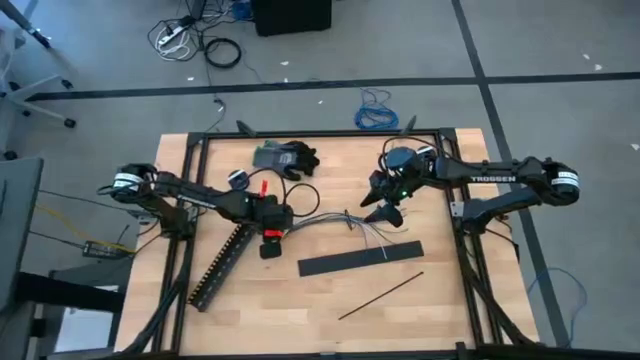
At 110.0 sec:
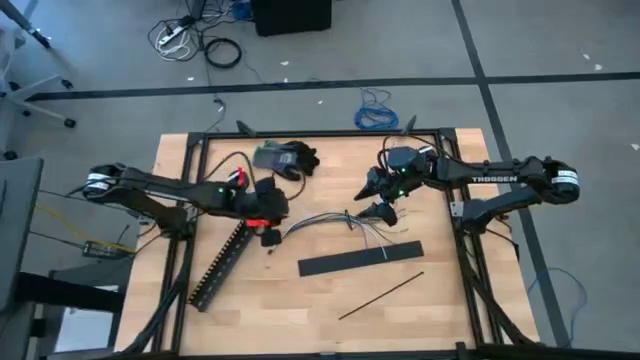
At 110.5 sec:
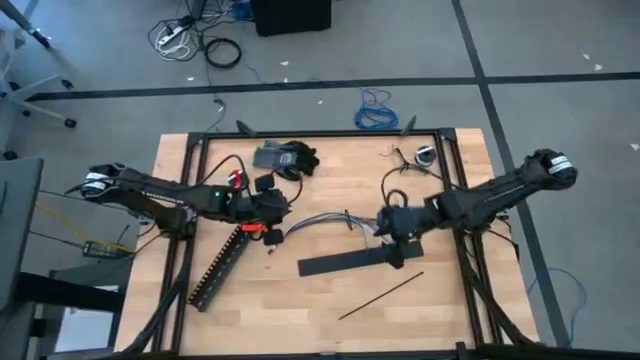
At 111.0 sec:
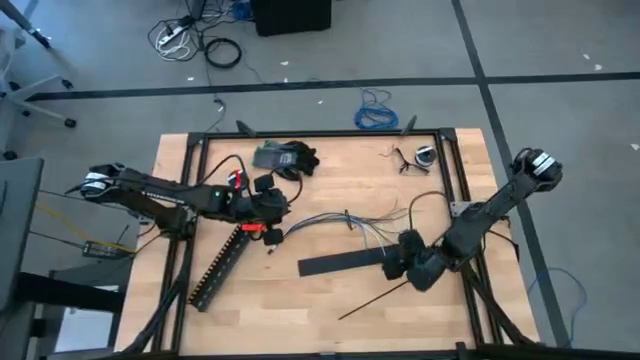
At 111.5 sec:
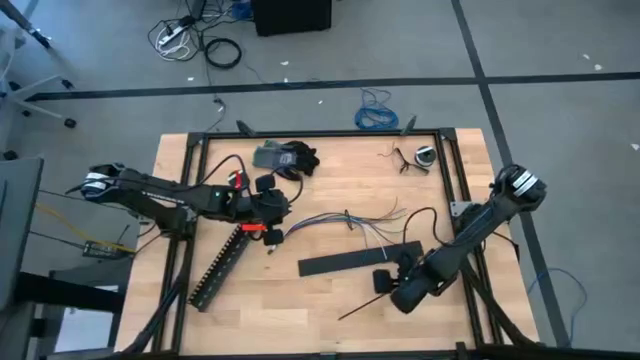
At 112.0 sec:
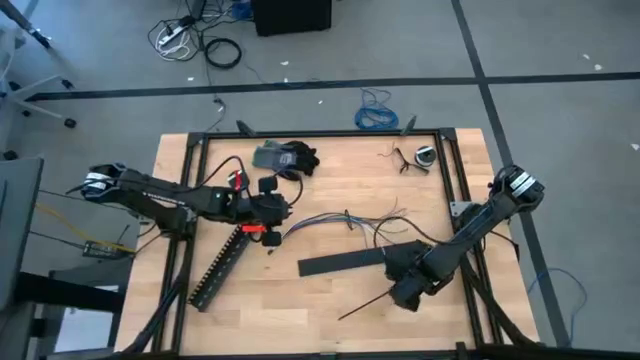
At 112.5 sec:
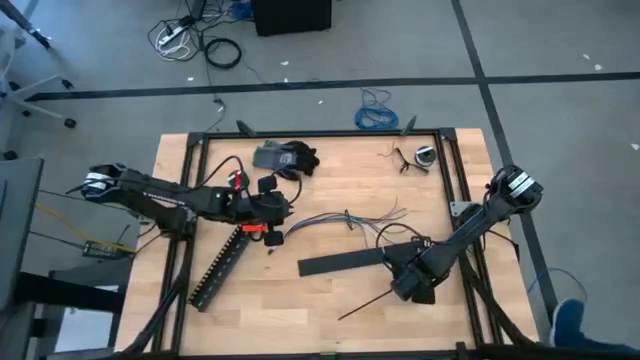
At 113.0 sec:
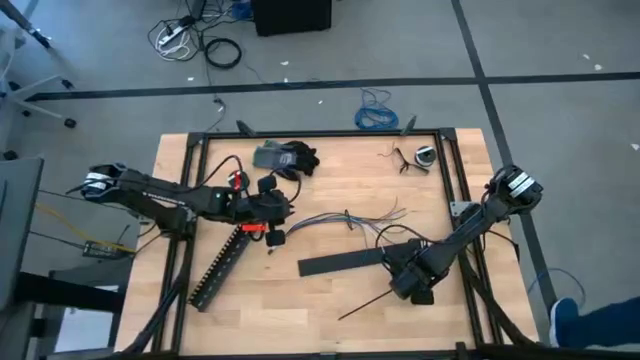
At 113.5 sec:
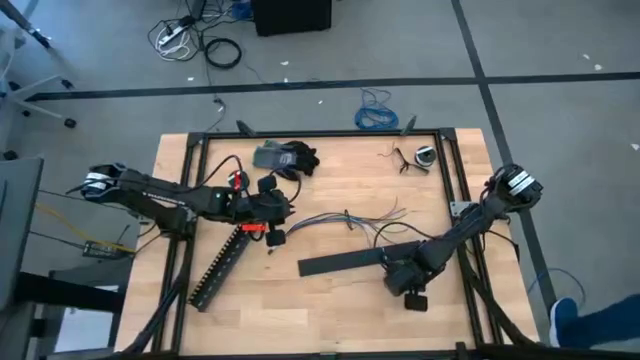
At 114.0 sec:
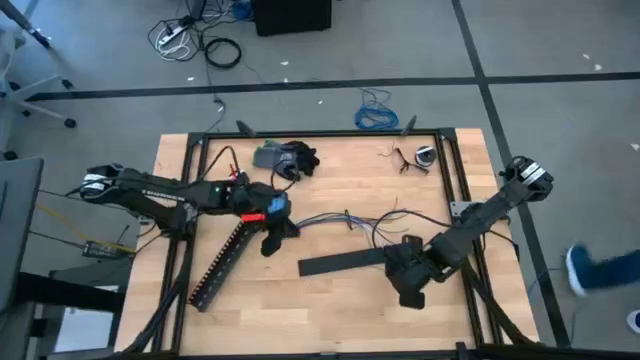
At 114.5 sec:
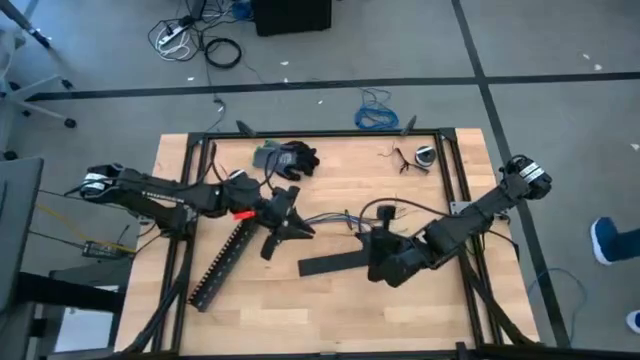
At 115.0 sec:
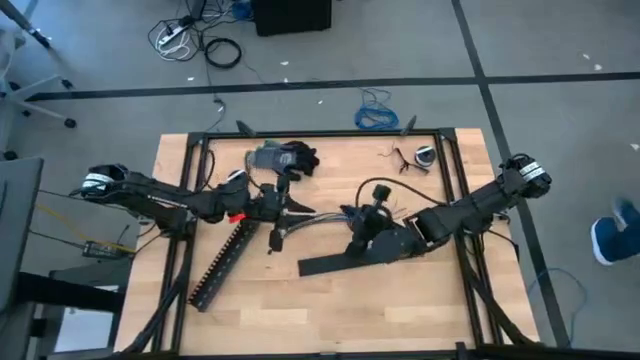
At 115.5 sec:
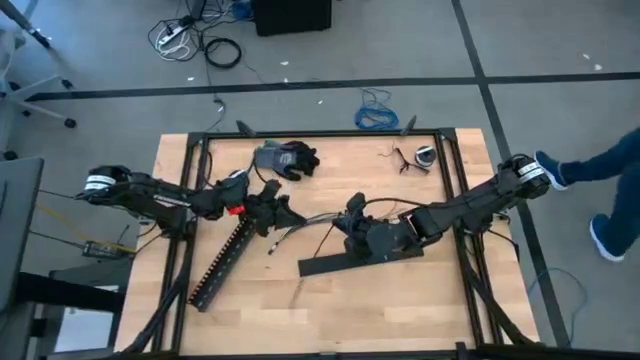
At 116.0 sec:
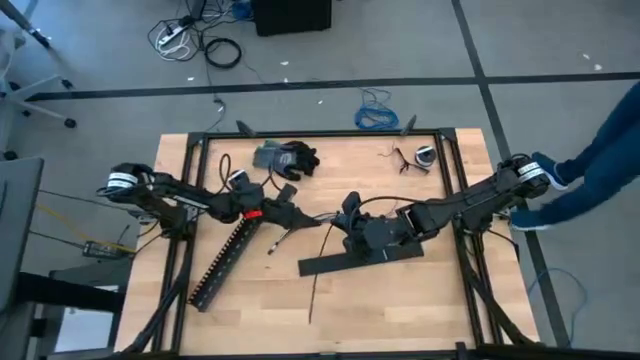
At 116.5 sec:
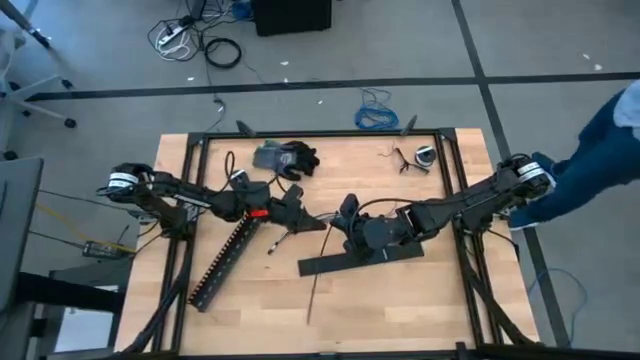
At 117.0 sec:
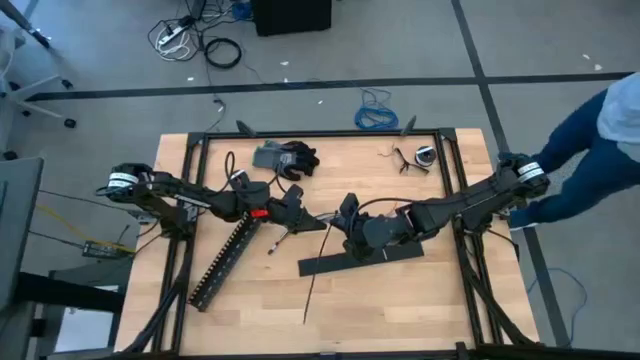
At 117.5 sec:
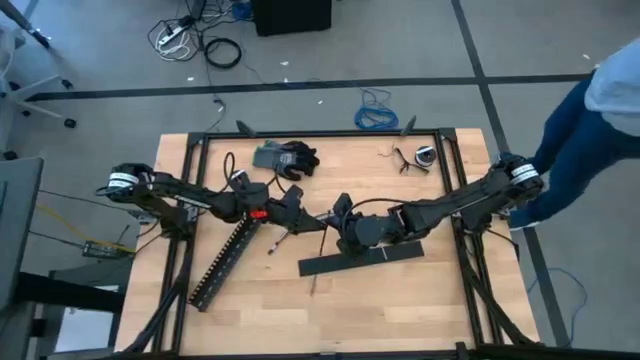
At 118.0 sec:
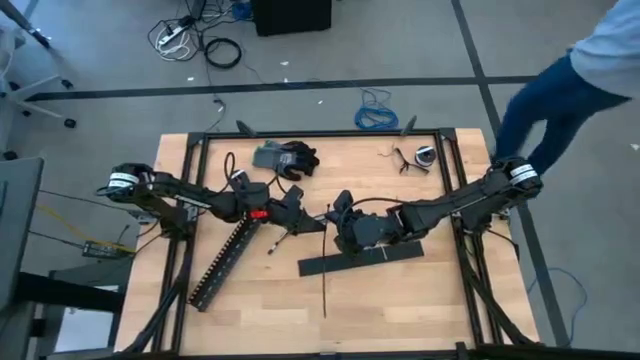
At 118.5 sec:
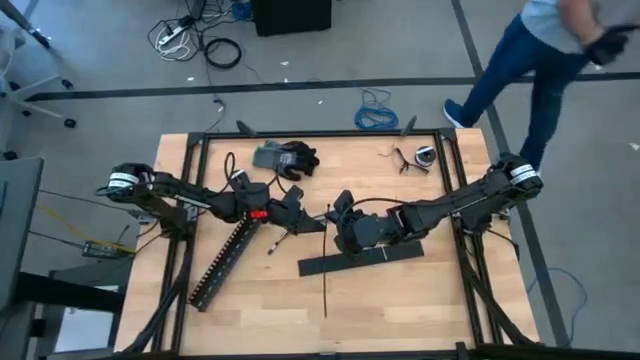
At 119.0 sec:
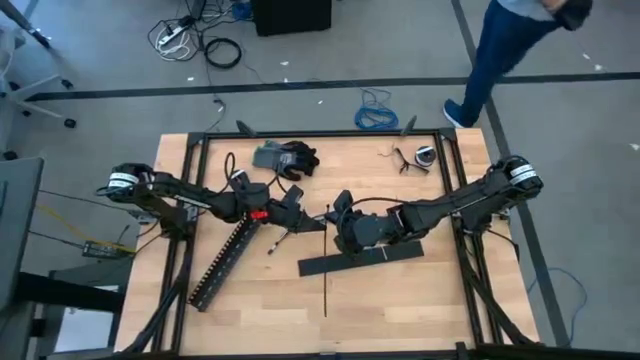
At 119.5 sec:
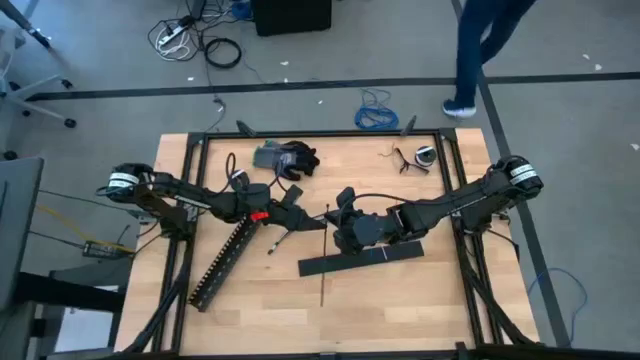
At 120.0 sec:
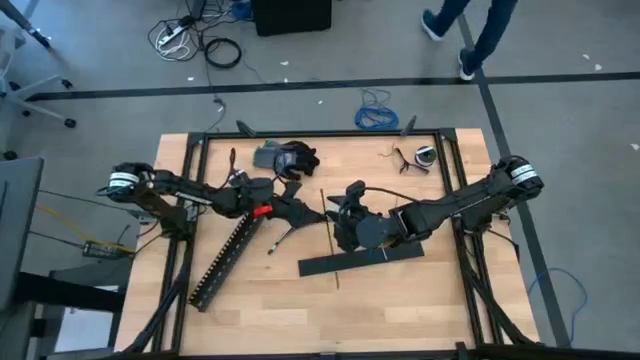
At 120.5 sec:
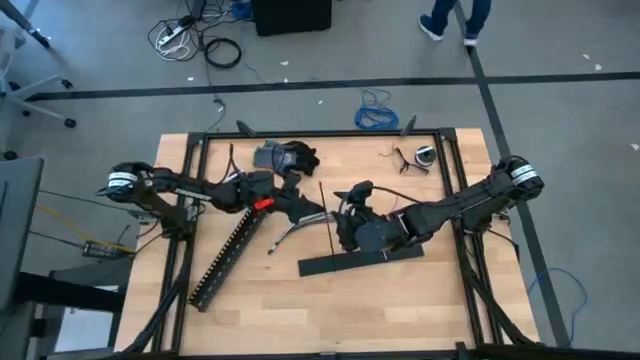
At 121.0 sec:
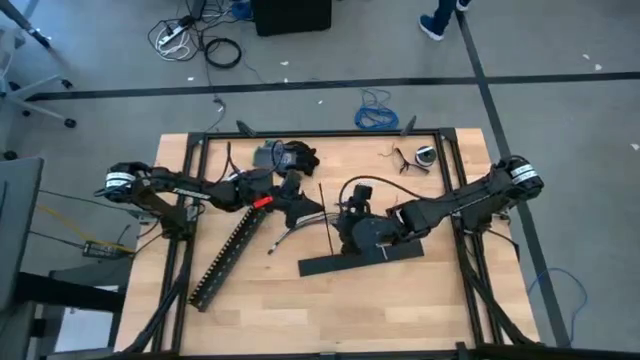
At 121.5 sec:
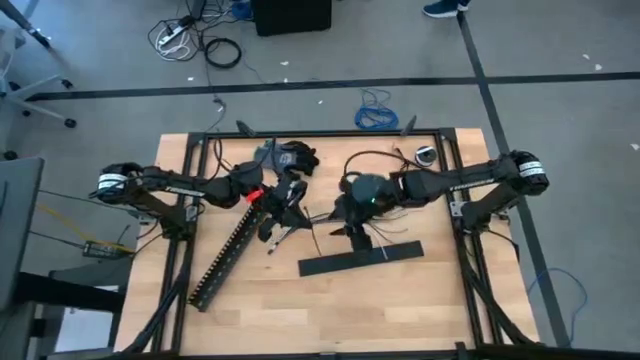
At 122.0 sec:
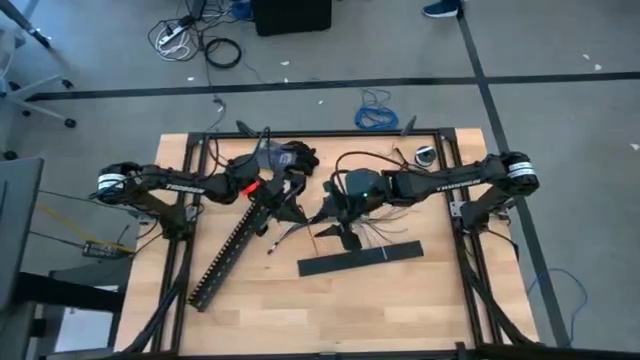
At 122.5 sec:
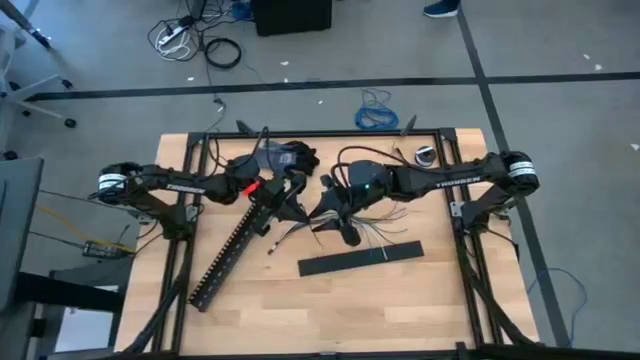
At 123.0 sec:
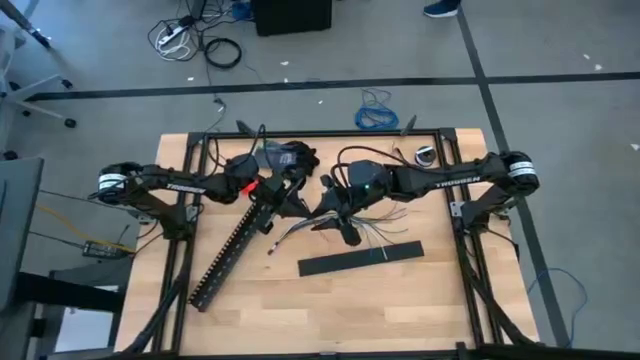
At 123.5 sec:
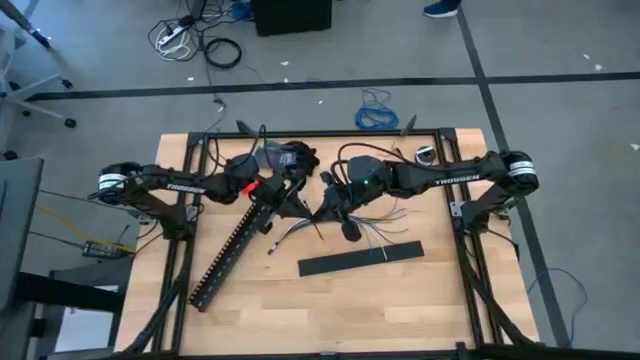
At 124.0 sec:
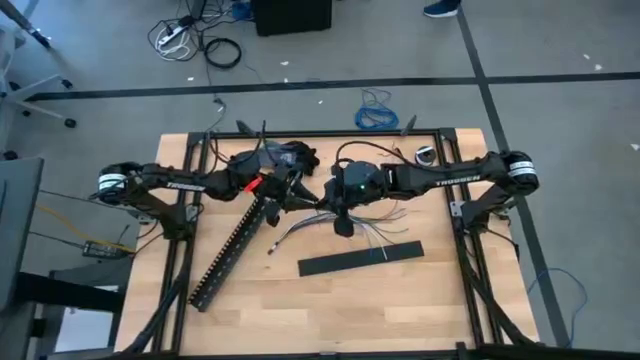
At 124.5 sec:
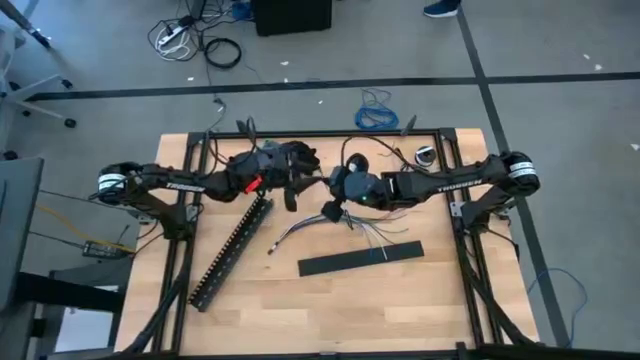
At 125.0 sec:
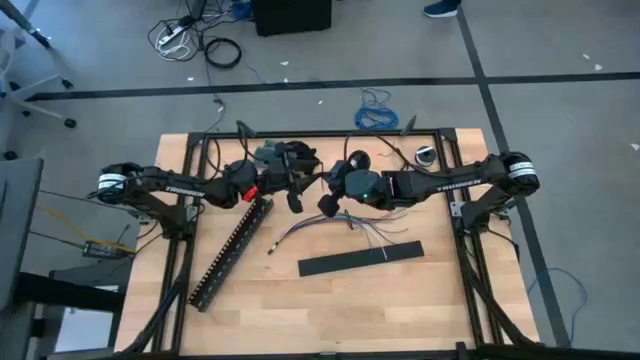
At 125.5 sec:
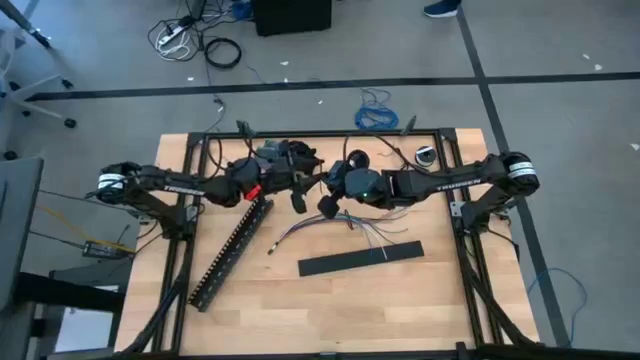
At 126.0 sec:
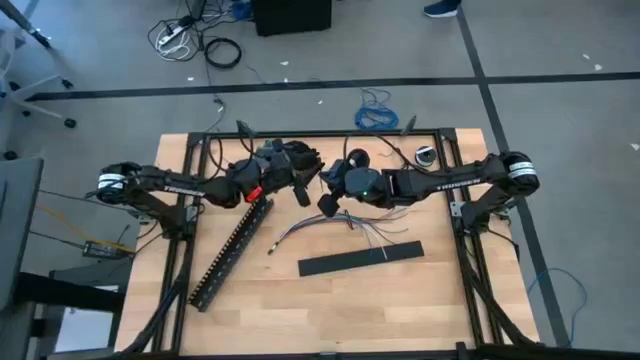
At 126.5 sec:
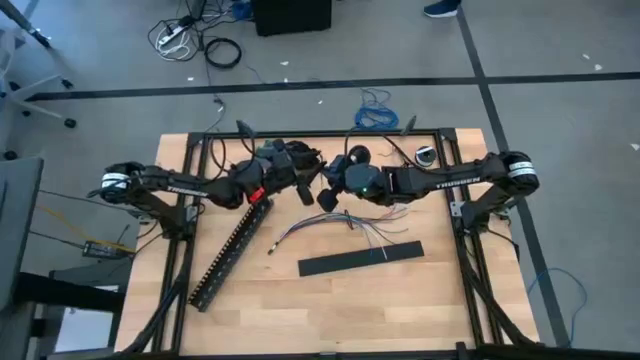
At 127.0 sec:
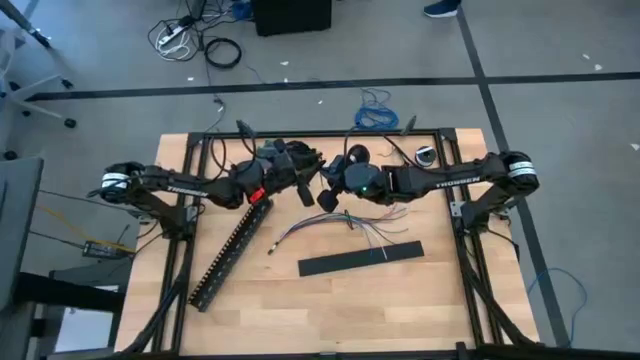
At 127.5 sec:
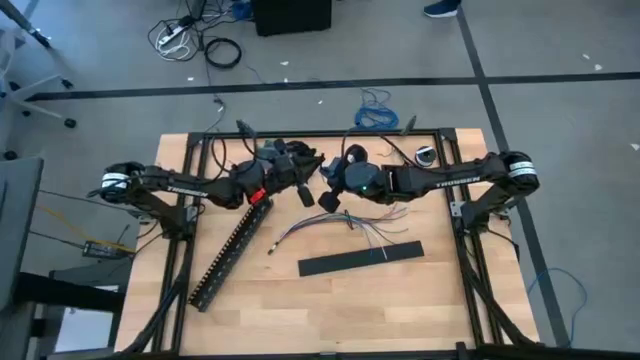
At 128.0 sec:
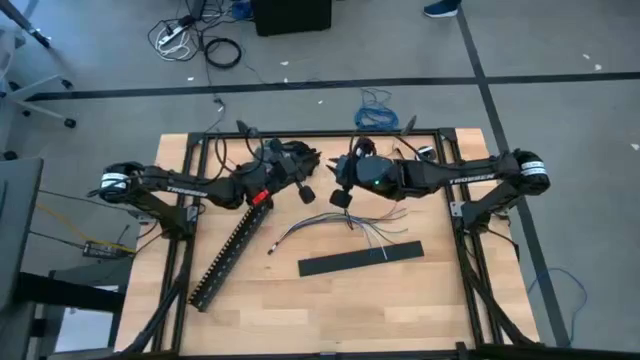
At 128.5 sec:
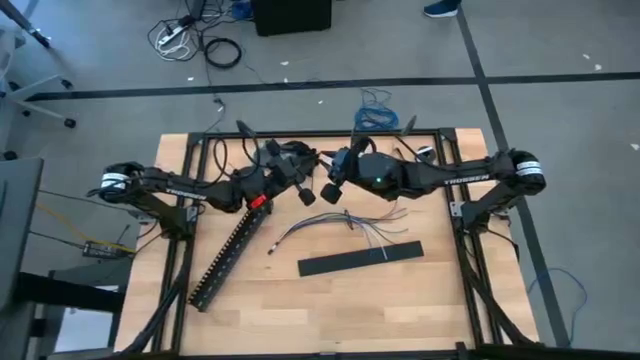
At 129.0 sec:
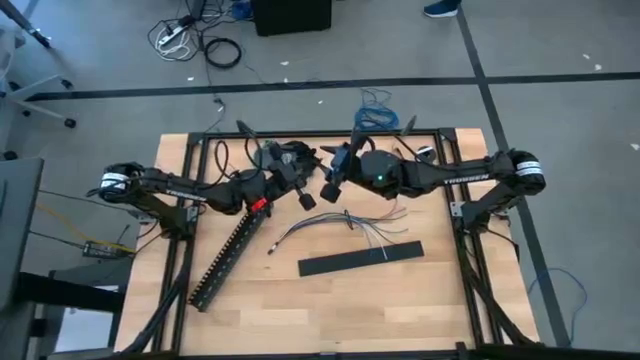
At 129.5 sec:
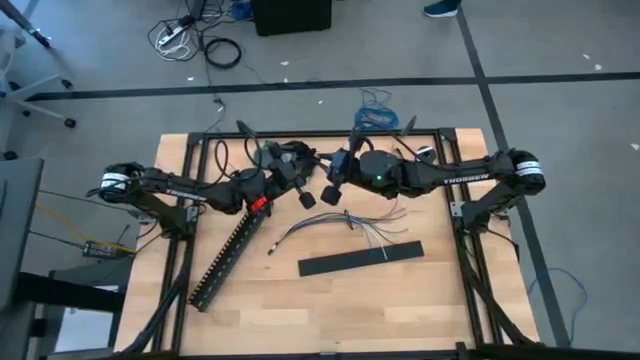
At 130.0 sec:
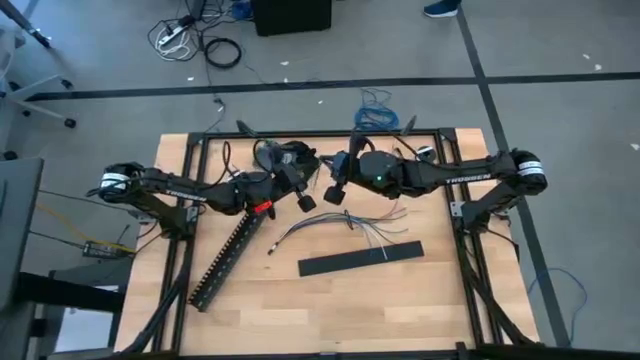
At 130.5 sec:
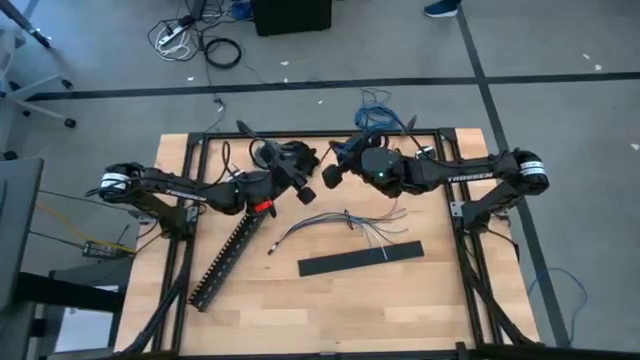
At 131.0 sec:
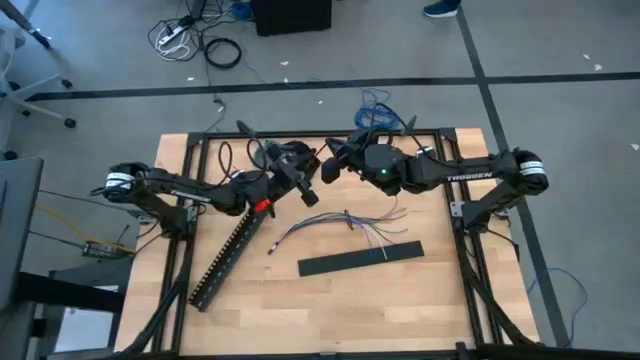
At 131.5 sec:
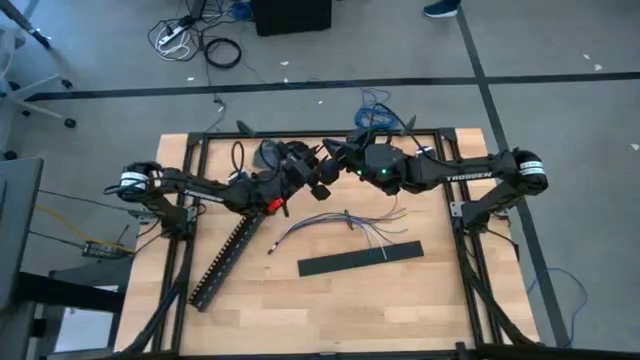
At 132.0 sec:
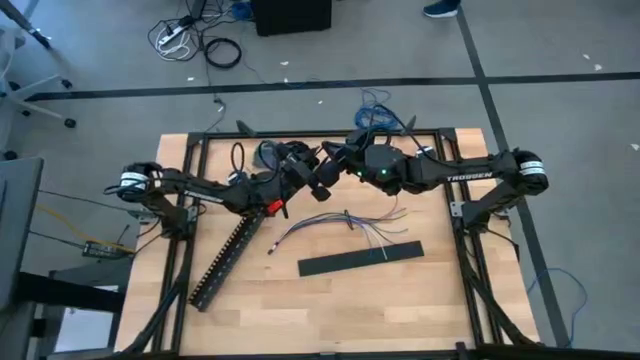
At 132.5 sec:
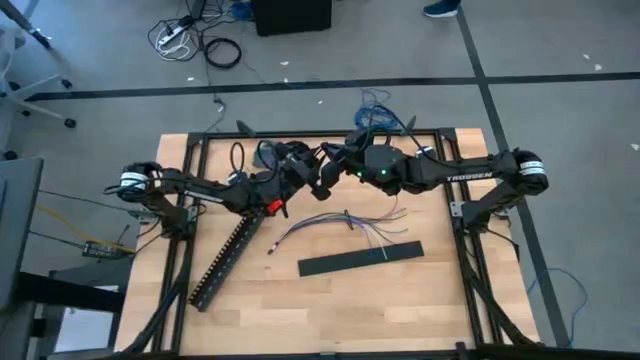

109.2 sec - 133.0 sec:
Task: Ziptie cables
Wrap the other black zip tie on the cable wires
